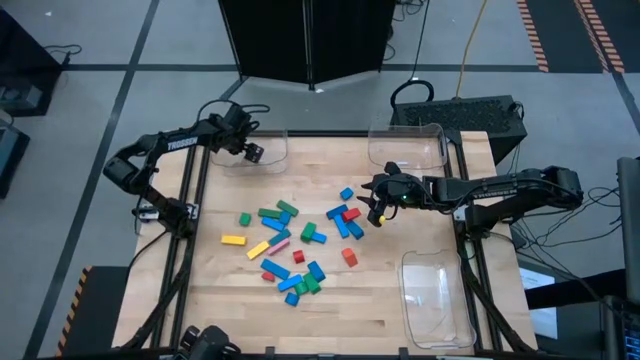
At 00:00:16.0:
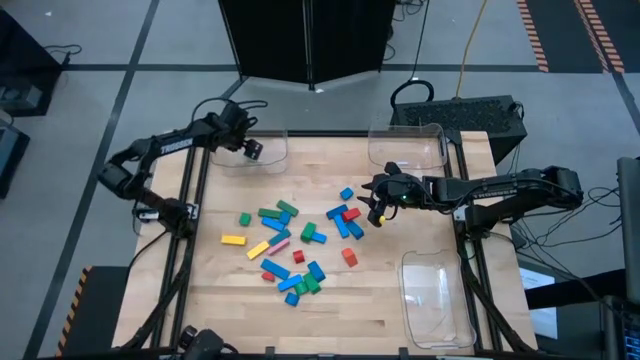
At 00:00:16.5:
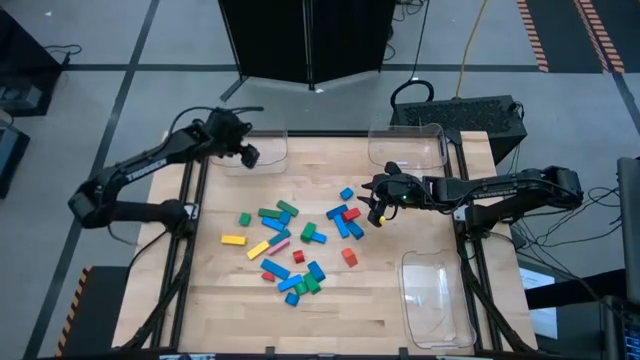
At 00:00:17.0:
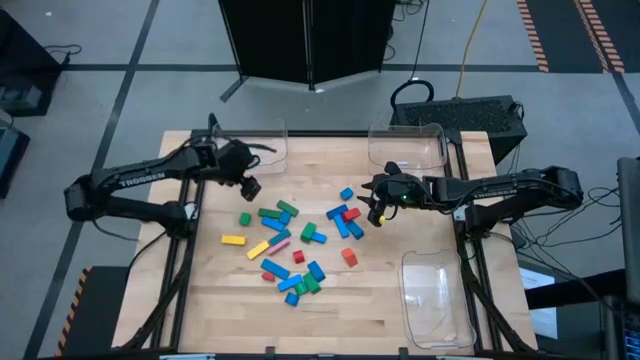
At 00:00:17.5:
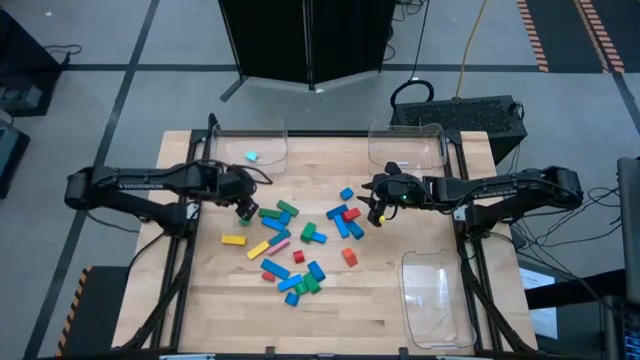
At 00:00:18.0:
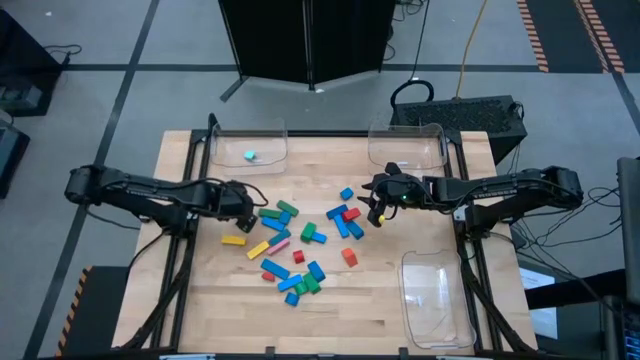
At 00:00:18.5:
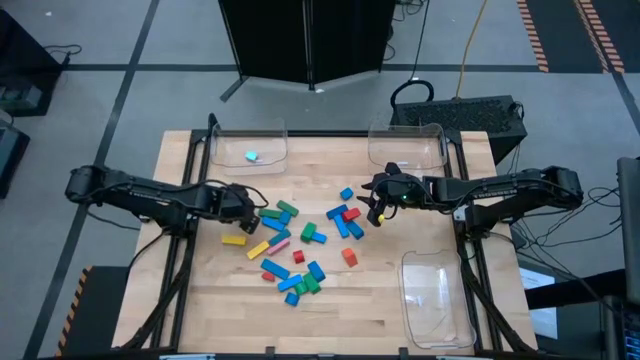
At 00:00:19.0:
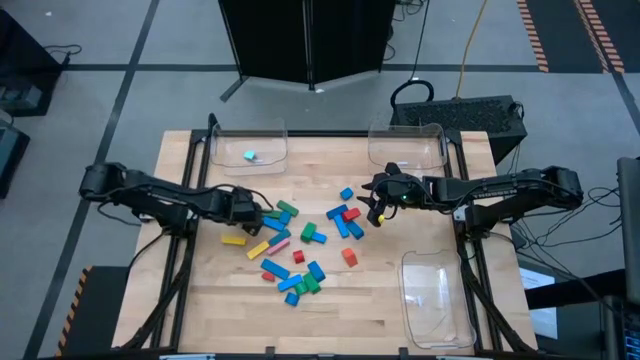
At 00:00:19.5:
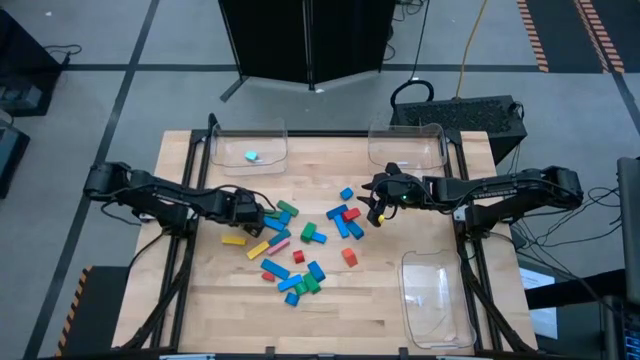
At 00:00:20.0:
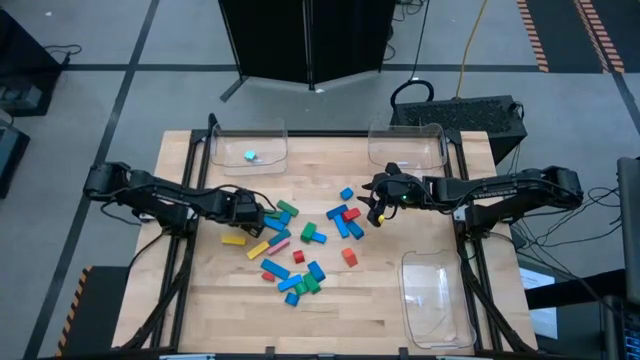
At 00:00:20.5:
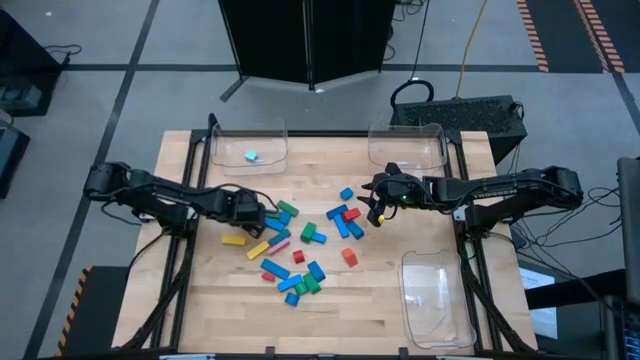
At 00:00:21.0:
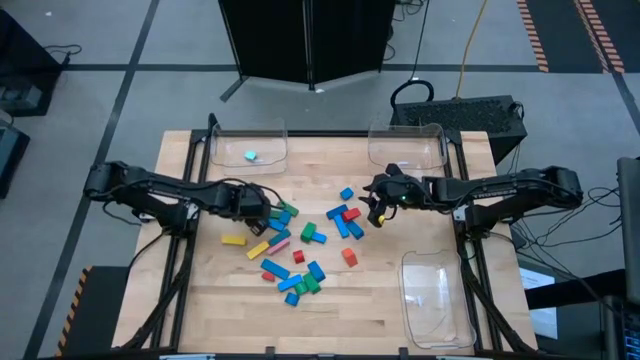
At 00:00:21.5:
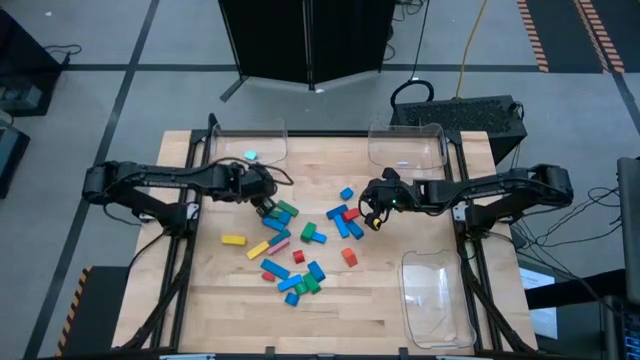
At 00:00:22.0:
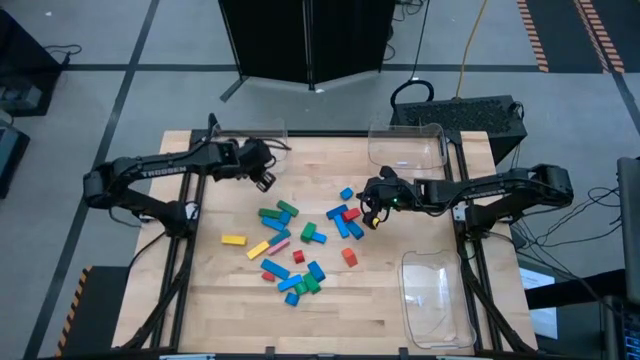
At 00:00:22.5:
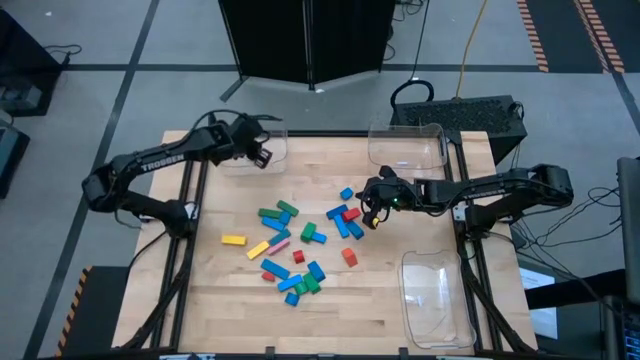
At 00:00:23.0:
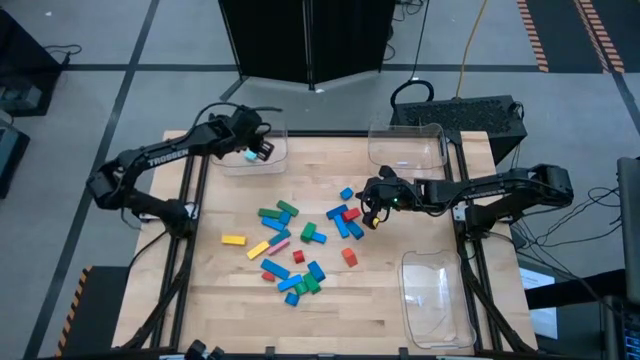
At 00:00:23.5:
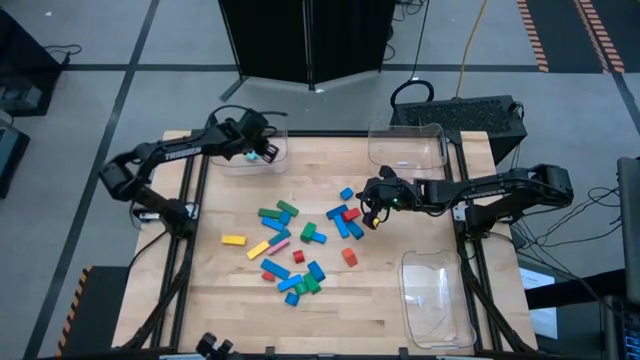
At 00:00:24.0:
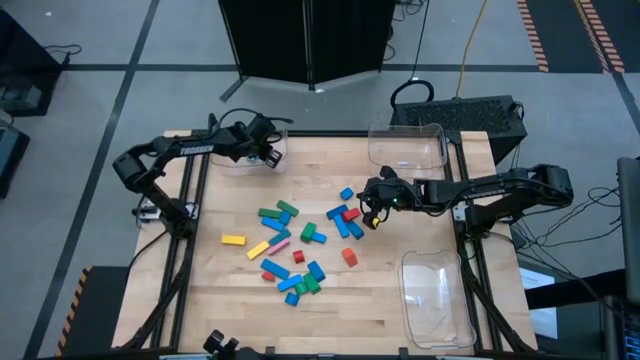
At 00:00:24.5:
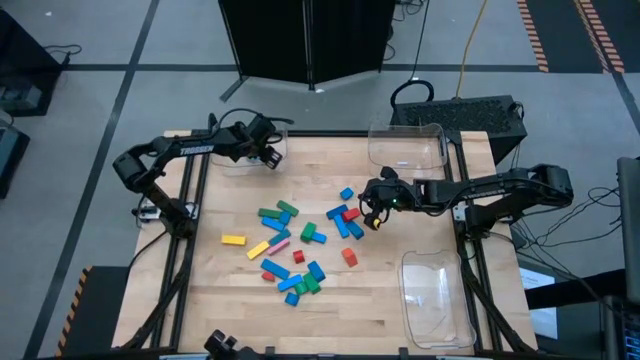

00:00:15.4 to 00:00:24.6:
Task: Sort blocks by size
Put the green half-circle block into the top left transparent bin

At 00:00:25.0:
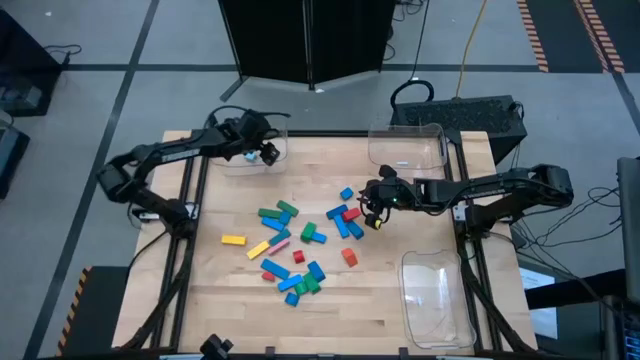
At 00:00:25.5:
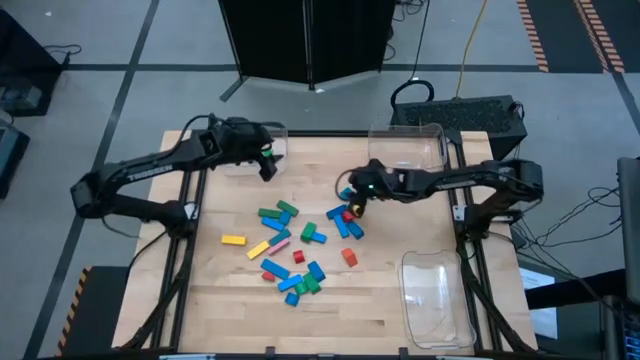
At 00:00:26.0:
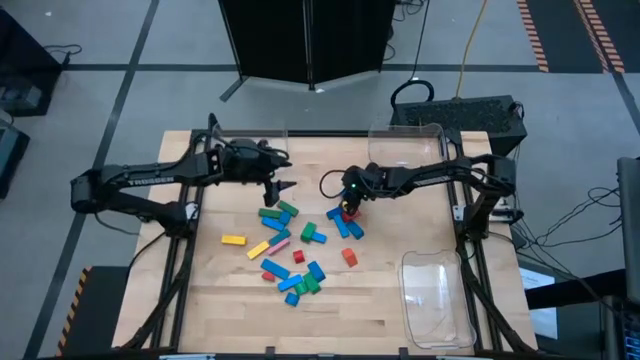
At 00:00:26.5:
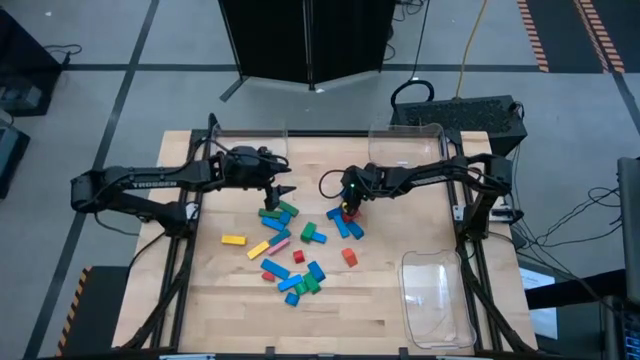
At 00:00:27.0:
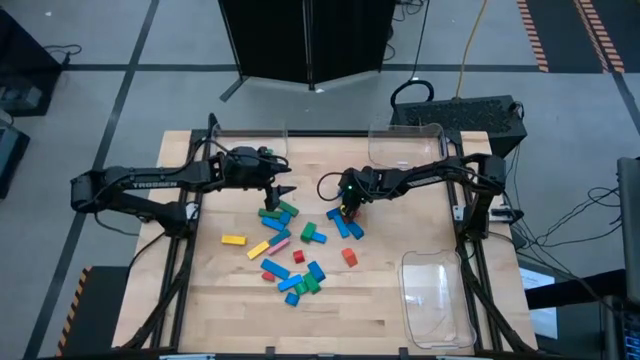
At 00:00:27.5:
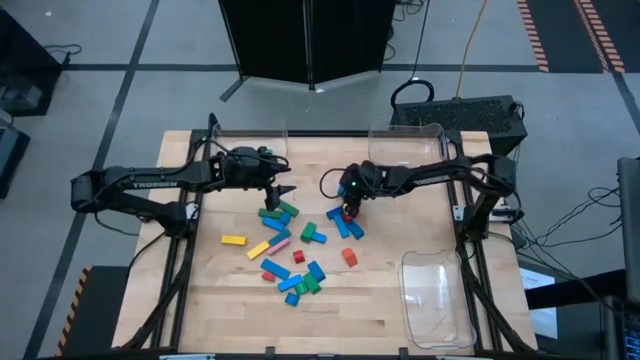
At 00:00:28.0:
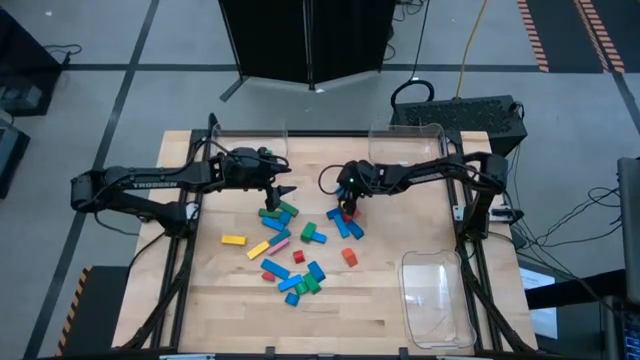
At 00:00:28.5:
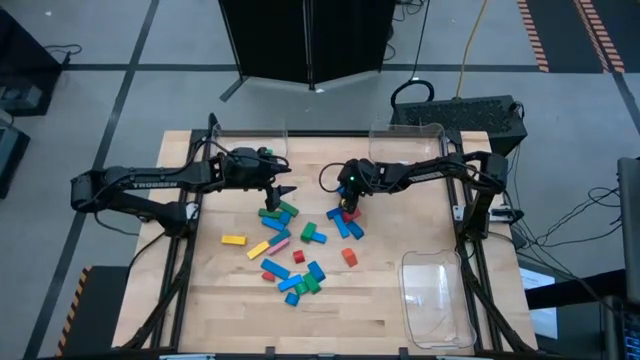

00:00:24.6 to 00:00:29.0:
Put the blue half-circle block into the top left transparent bin

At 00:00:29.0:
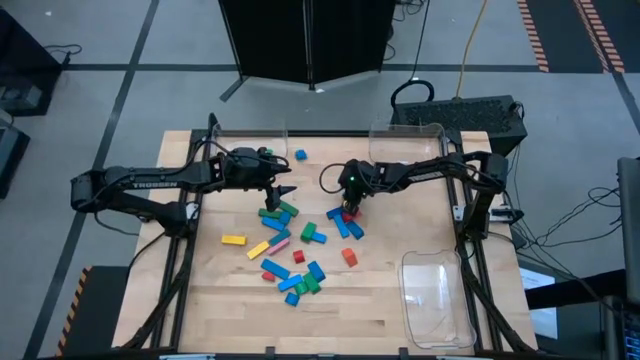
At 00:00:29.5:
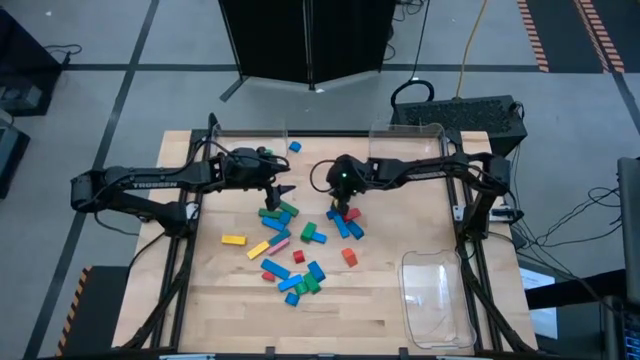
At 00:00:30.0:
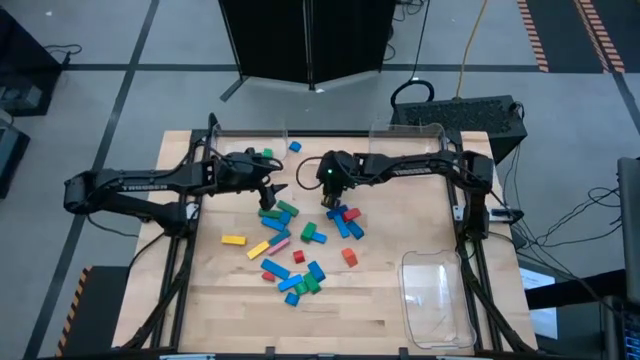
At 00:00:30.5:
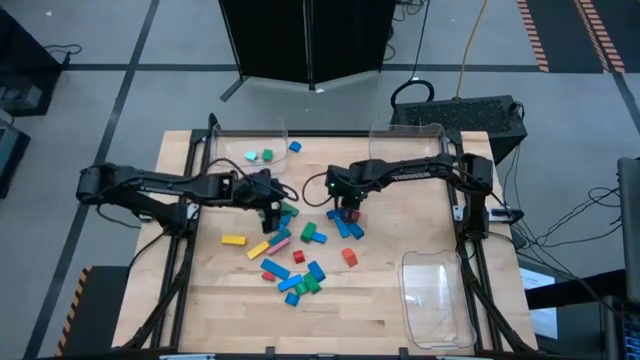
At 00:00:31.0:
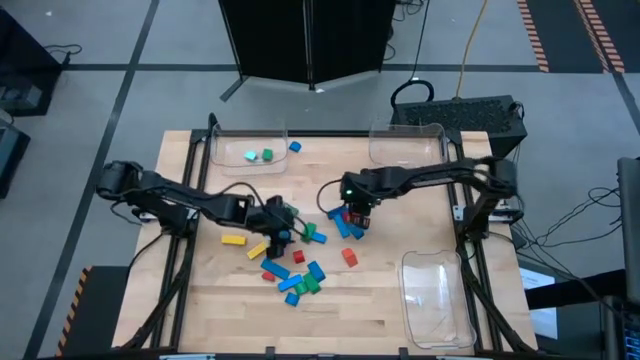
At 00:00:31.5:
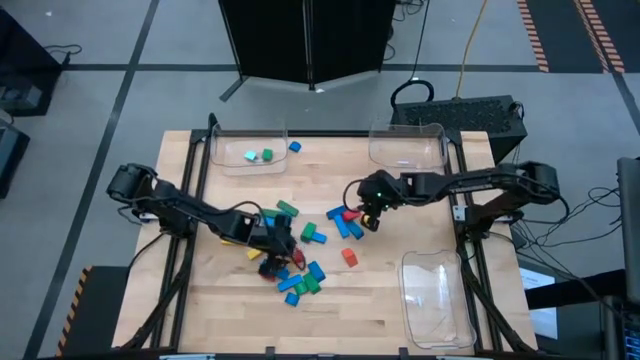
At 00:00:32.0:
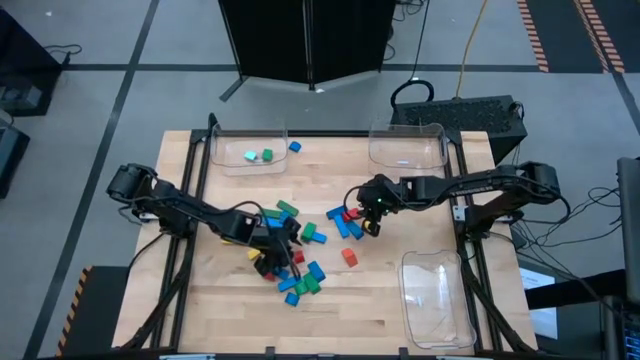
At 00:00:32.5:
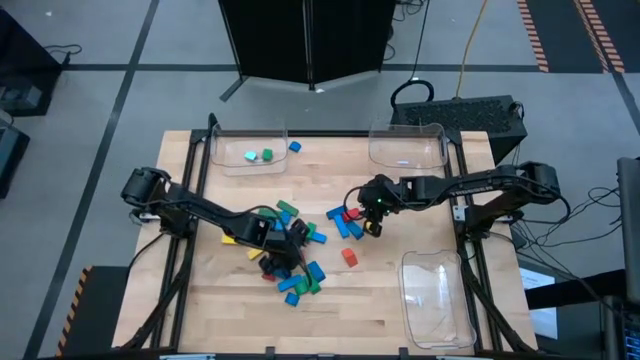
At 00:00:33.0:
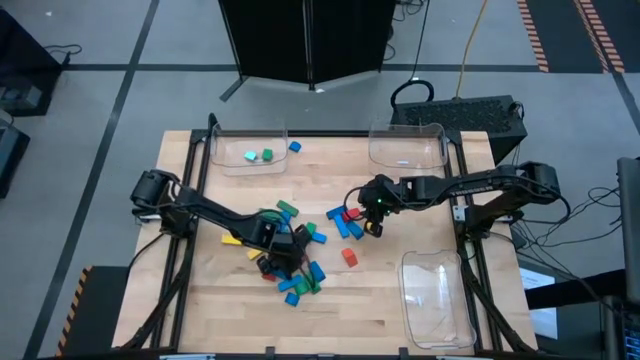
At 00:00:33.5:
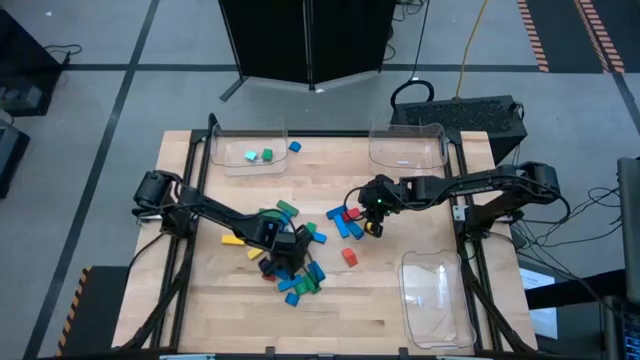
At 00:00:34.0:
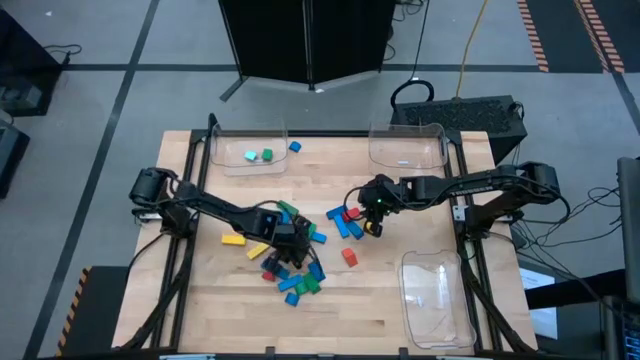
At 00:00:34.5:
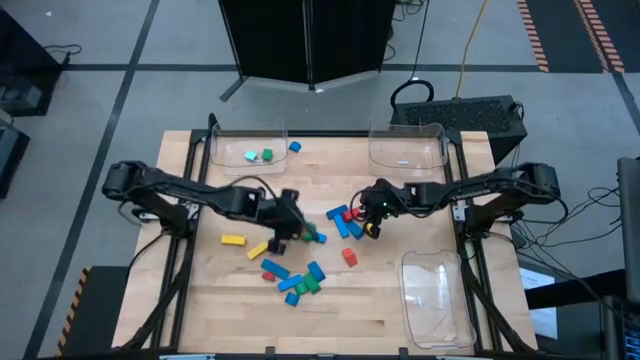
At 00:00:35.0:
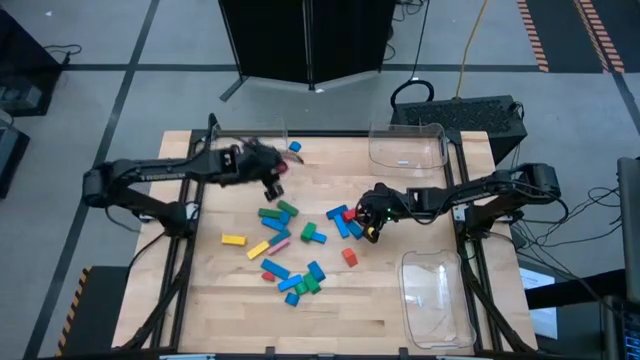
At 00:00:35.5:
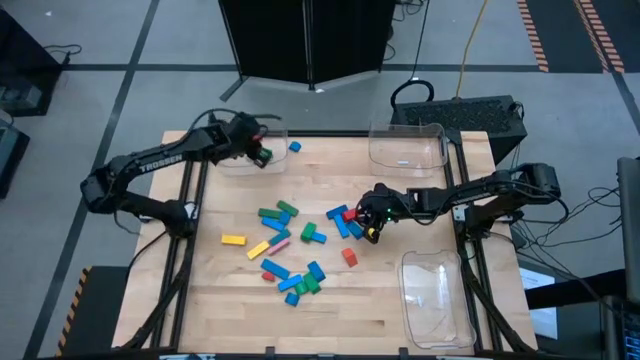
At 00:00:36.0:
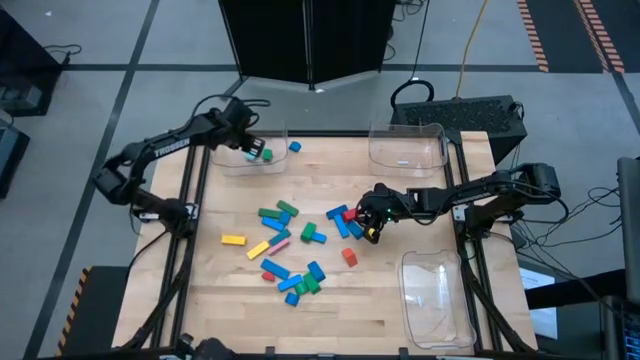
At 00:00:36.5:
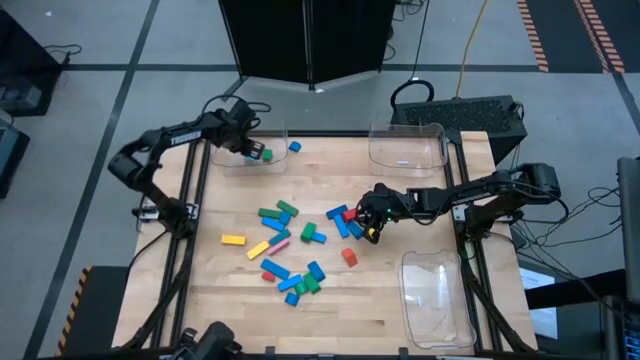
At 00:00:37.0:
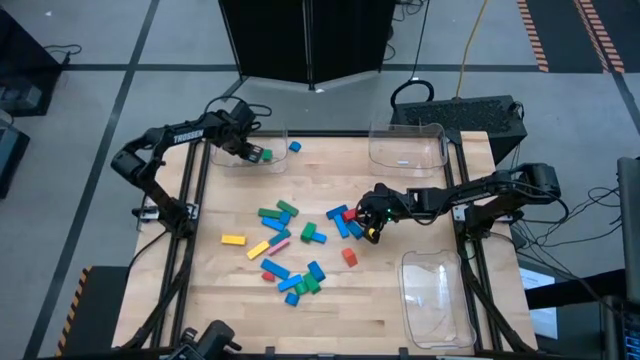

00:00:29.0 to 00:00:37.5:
Put the red half-circle block into the top left transparent bin

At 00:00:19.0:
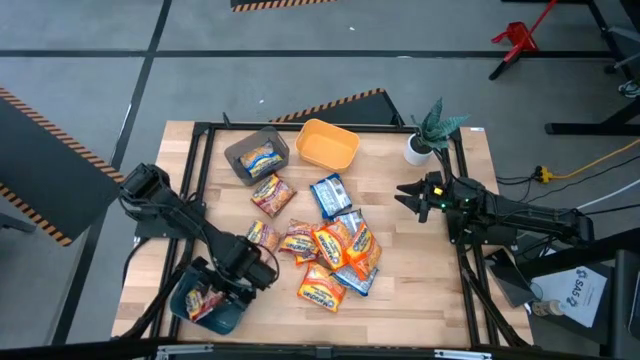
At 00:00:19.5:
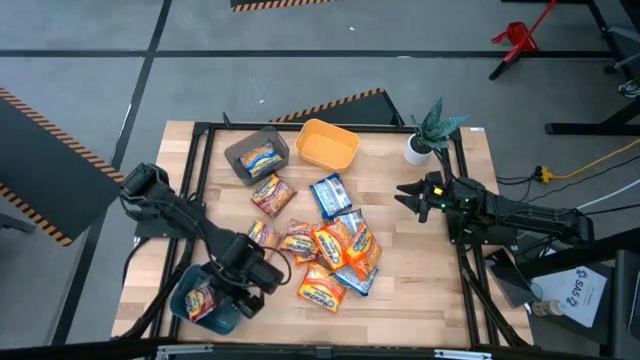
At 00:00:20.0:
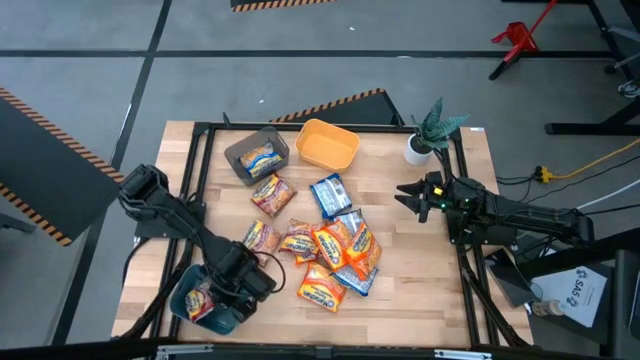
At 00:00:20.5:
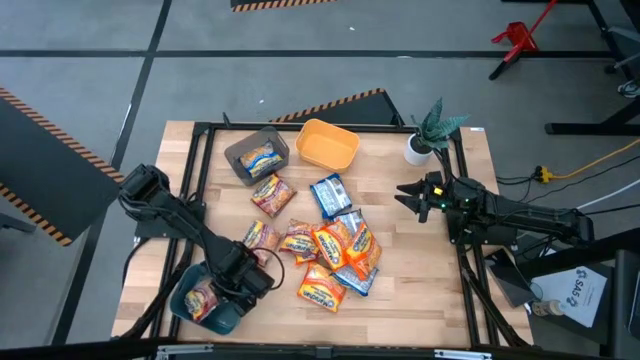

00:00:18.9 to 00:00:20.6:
Task: Sort Maruchan noodles
Adjust the pack of red ramen noodle soup
